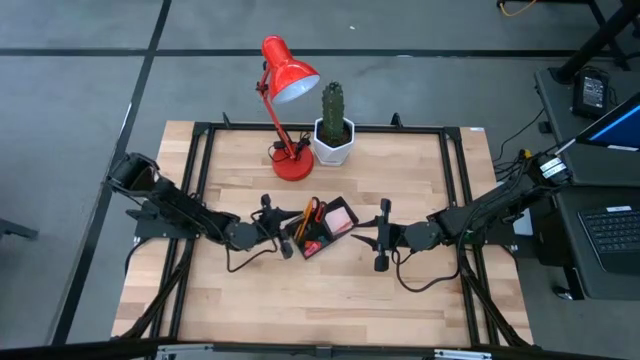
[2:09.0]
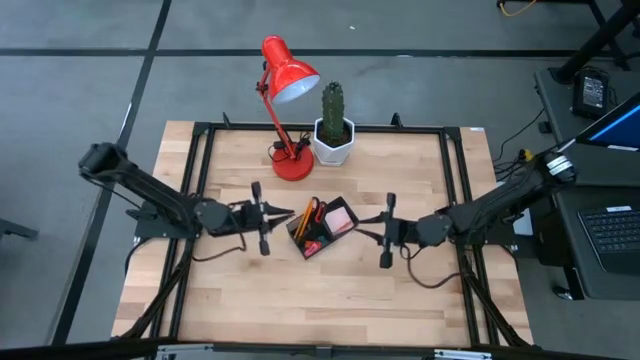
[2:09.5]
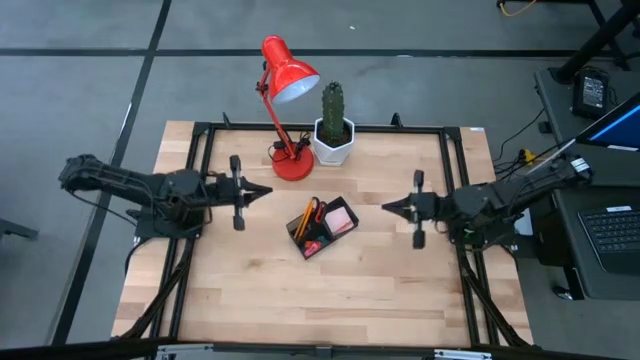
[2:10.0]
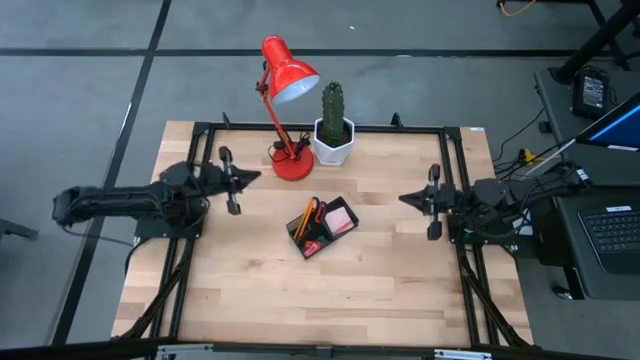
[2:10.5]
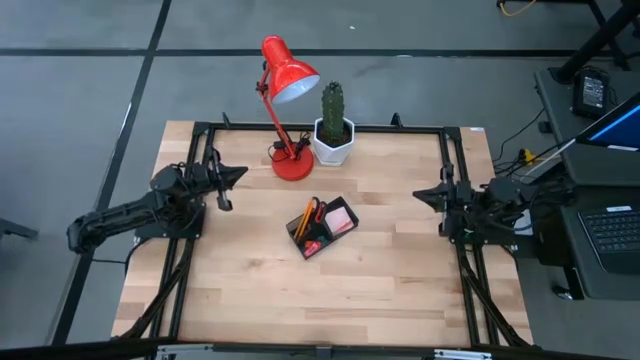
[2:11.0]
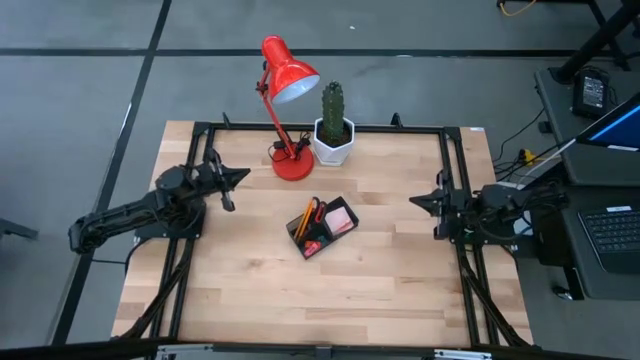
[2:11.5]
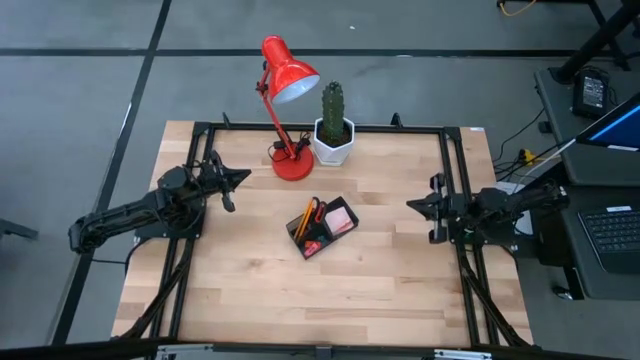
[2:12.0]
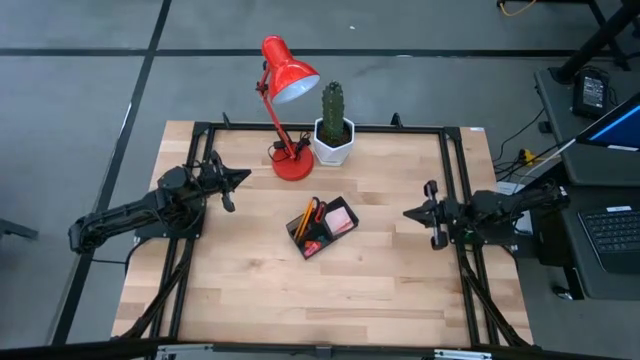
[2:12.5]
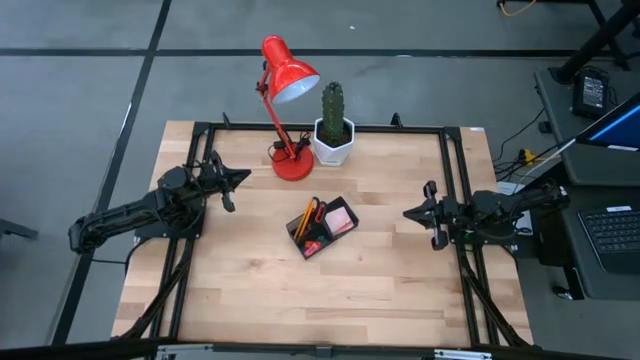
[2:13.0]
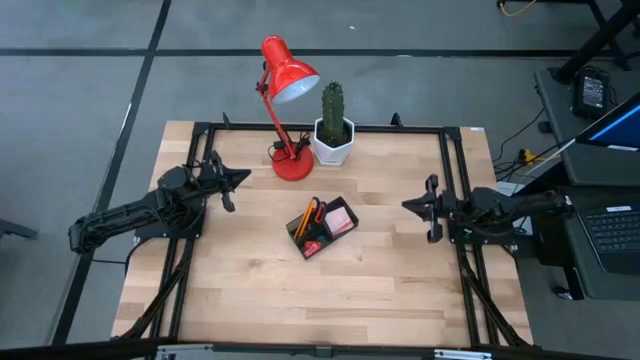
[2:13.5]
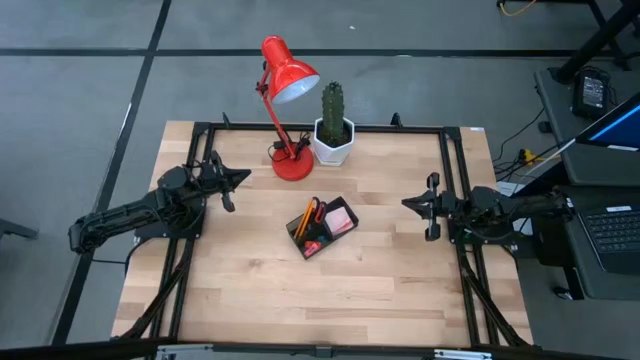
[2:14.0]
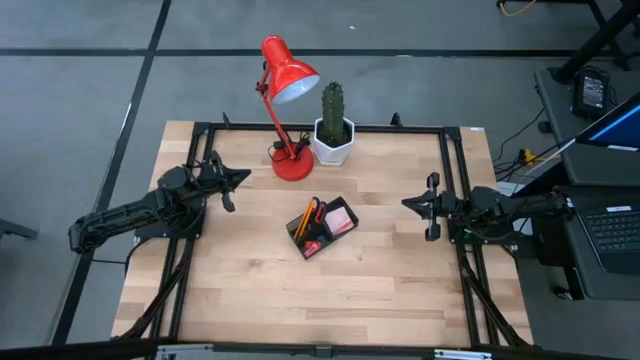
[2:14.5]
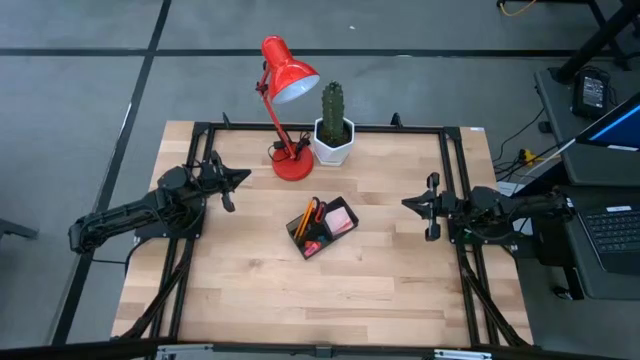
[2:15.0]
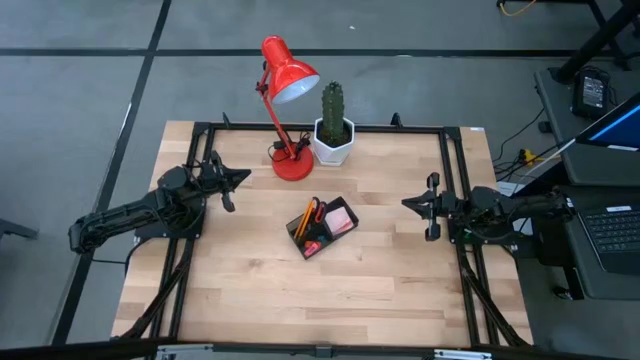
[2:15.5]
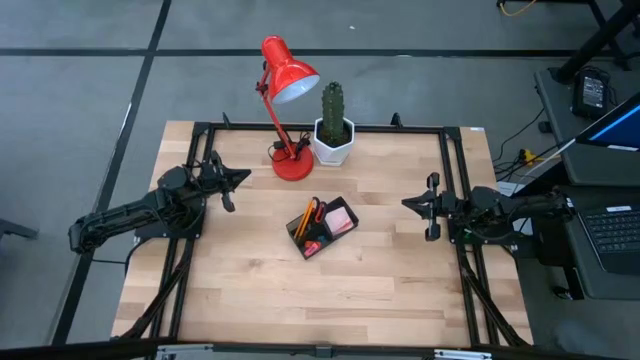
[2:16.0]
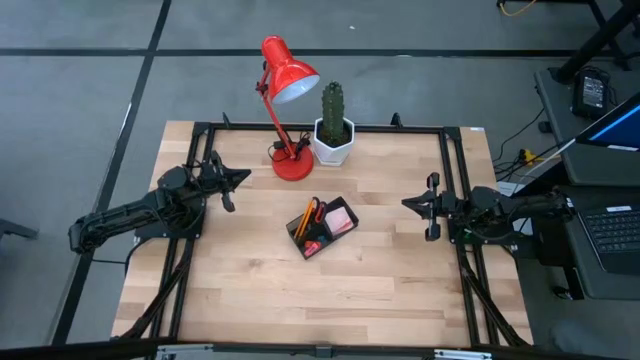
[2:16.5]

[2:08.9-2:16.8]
Task: Pick and place office supplies into organizer
Return to Home Position

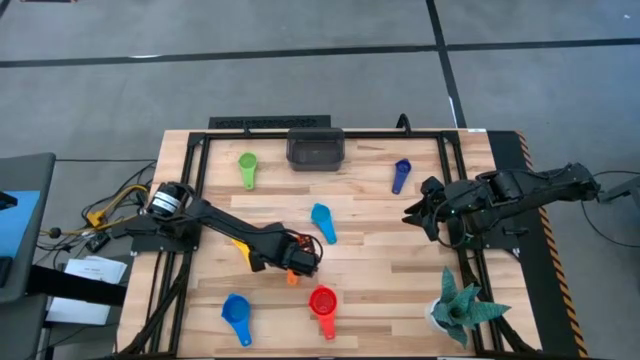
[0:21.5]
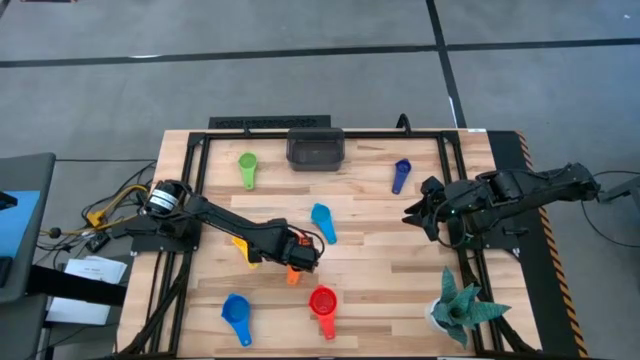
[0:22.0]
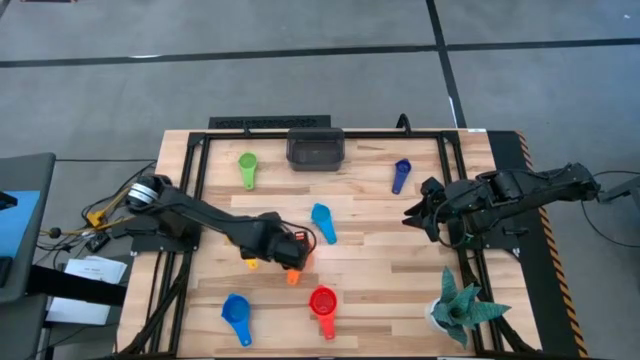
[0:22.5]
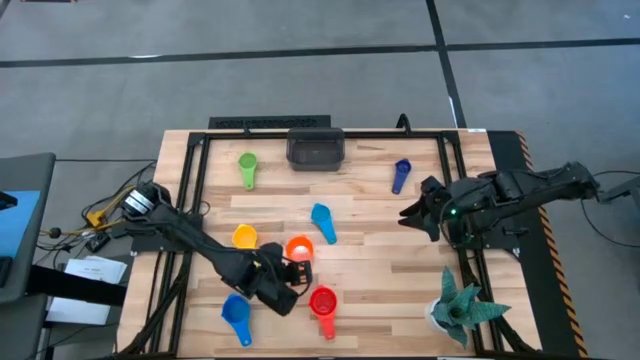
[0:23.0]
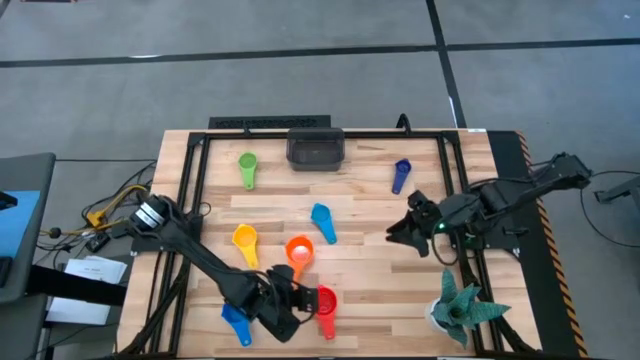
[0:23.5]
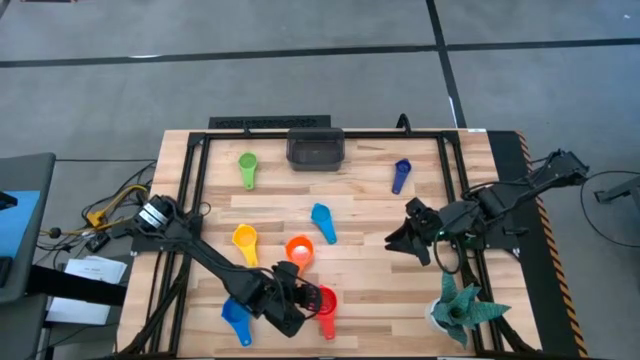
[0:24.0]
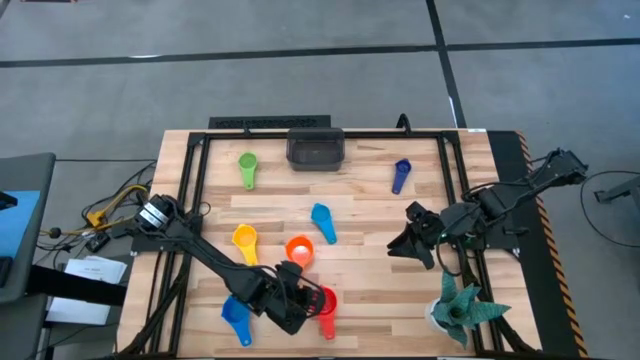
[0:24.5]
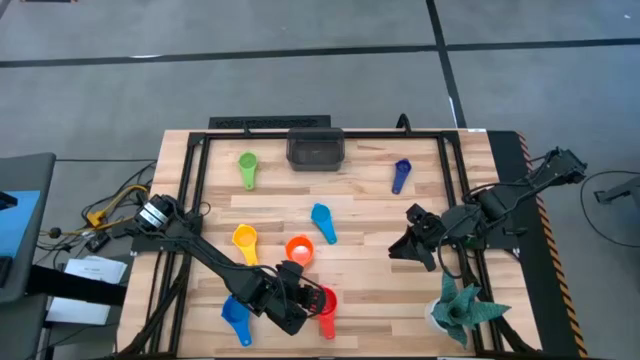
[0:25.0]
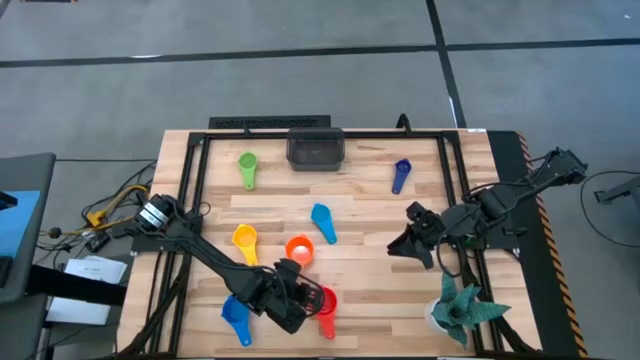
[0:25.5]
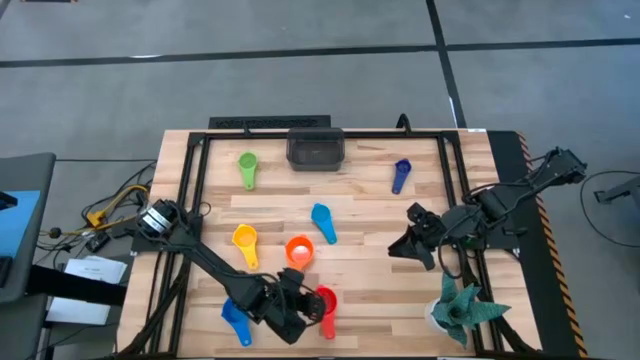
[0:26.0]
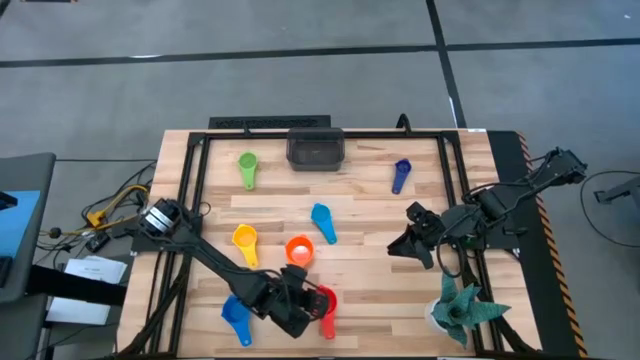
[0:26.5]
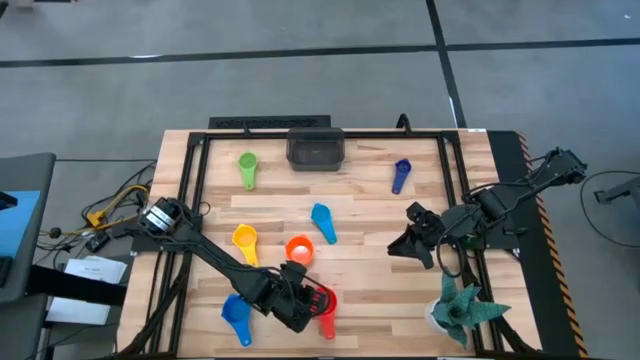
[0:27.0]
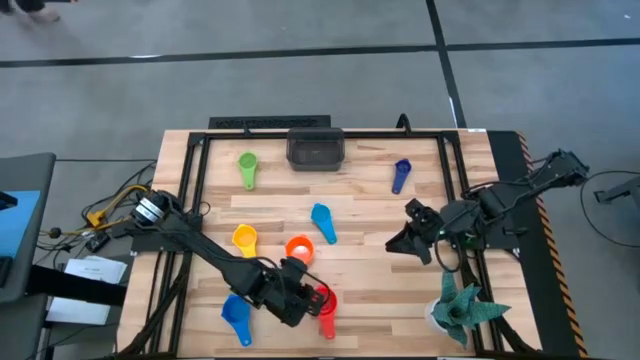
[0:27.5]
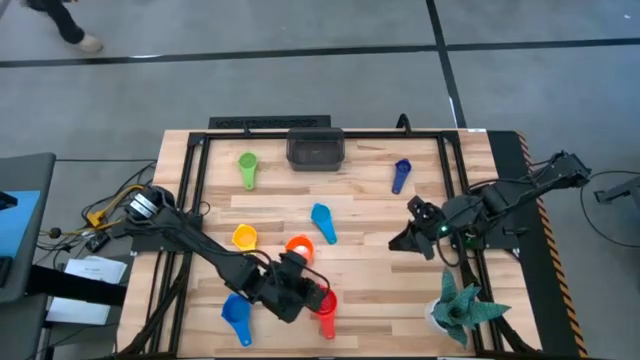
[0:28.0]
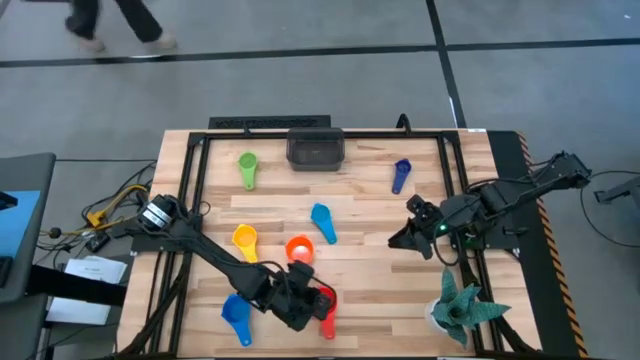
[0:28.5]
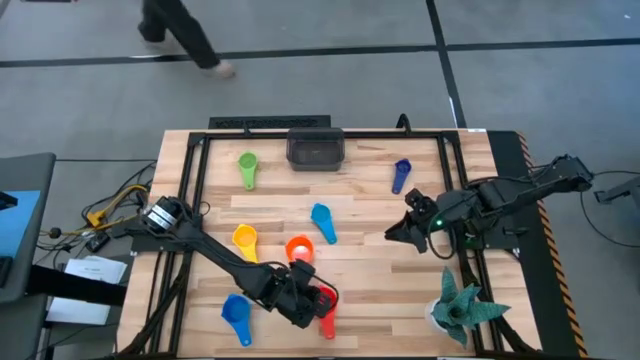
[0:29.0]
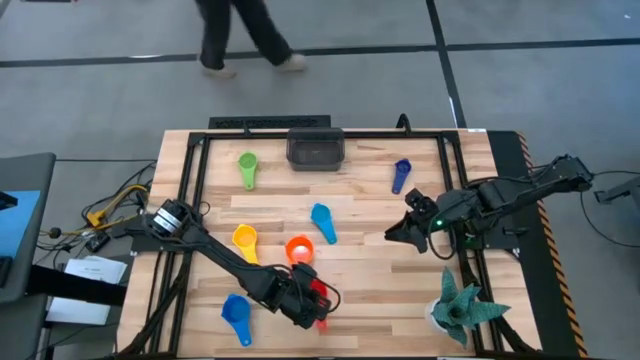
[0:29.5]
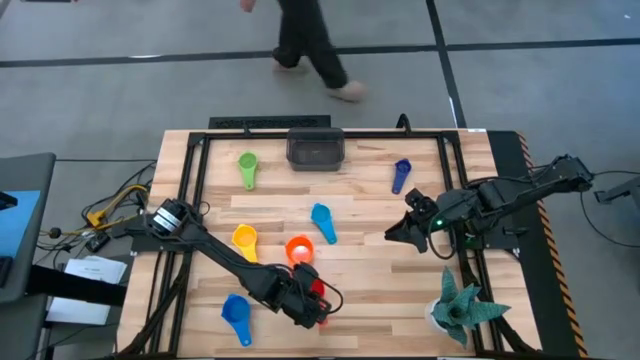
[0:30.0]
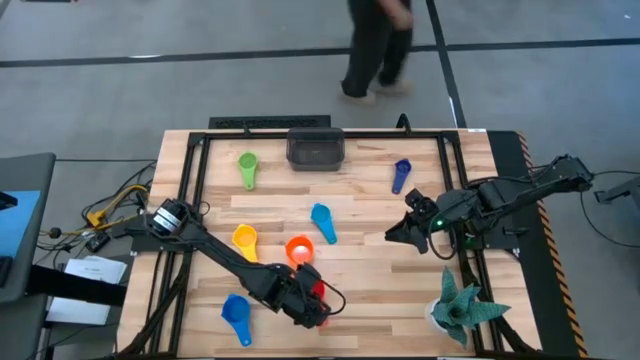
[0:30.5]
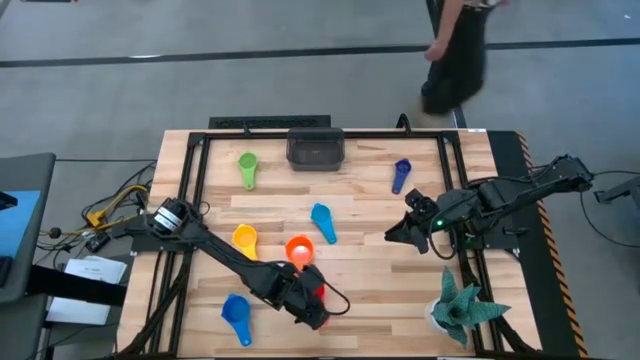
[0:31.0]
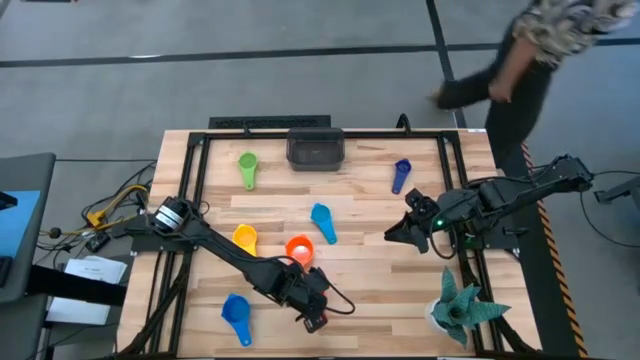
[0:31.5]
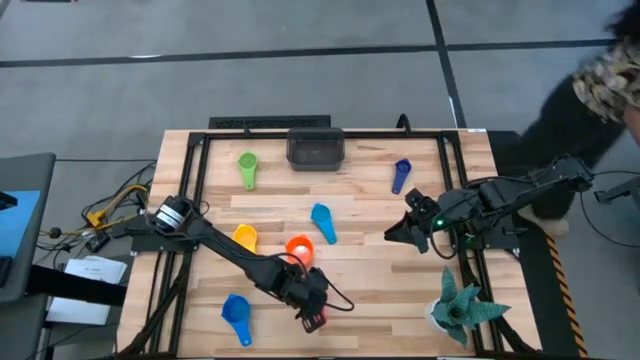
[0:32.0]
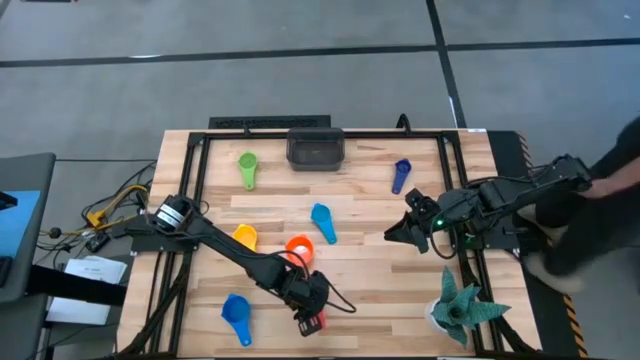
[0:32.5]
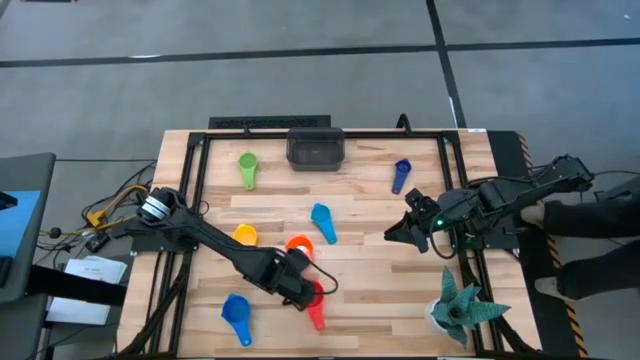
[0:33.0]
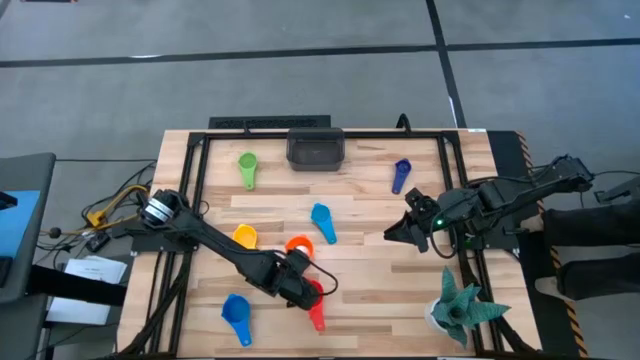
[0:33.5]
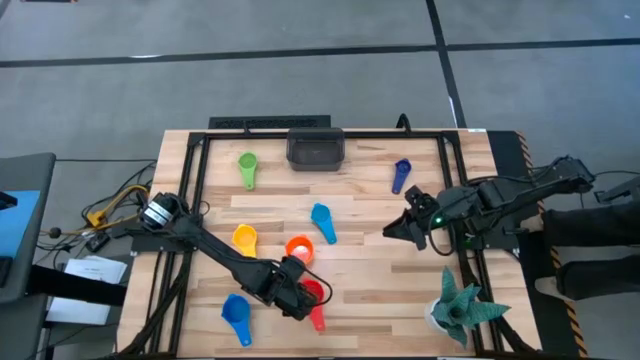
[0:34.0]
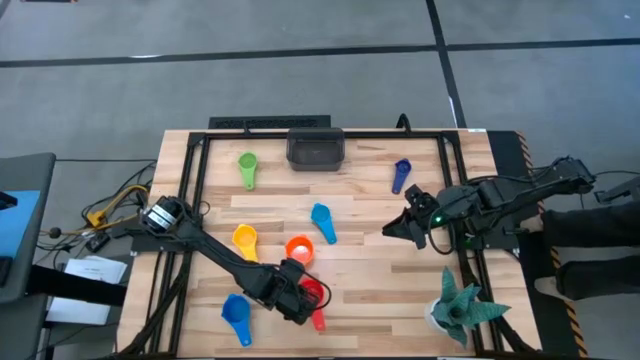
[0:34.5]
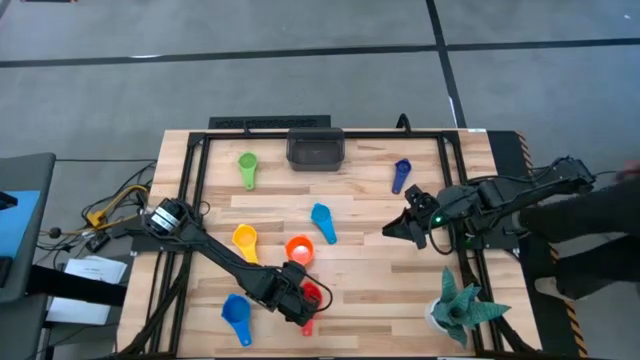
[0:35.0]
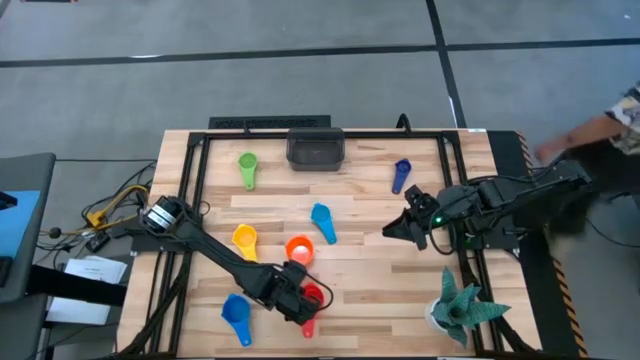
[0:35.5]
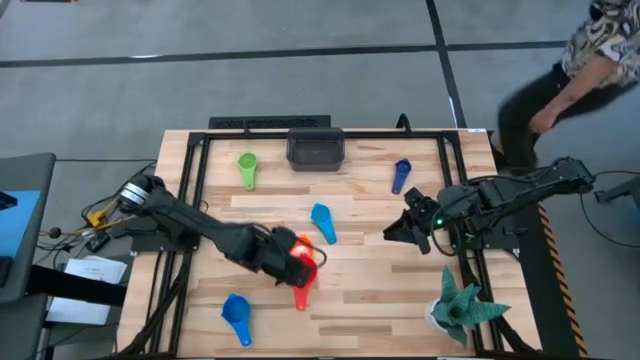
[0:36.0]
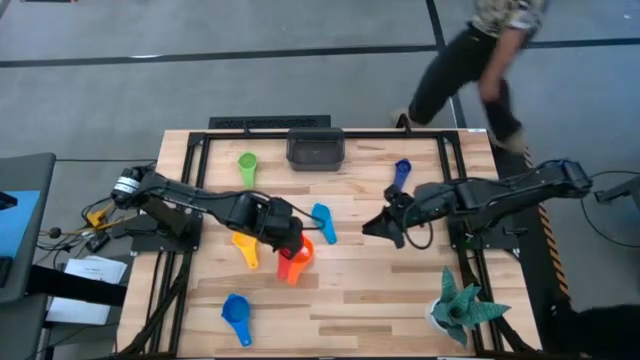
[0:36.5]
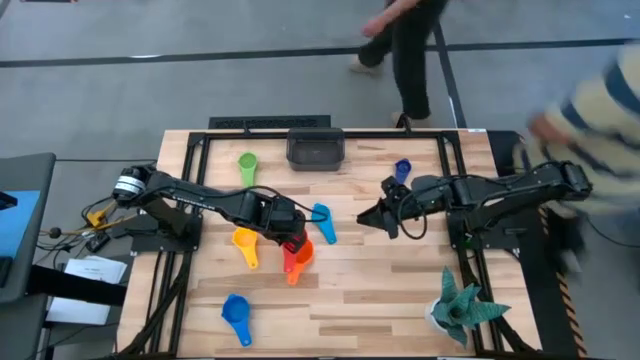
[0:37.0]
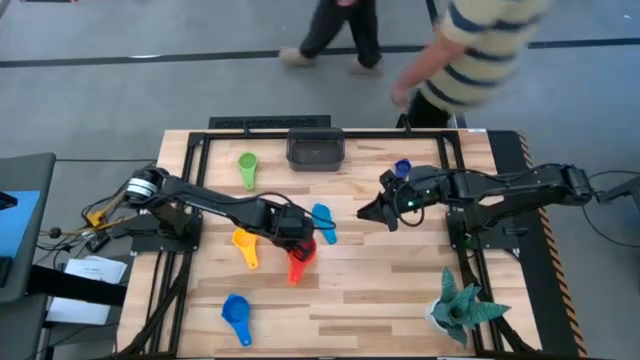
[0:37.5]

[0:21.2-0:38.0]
Task: Nest measuring cups in basket
Stack the red measuring cup on top of the orange measuring cup
